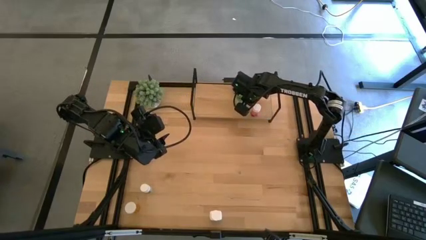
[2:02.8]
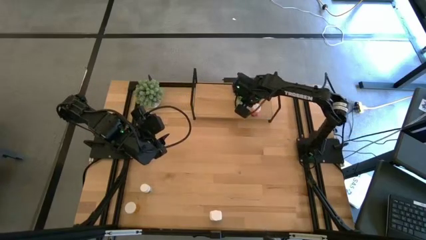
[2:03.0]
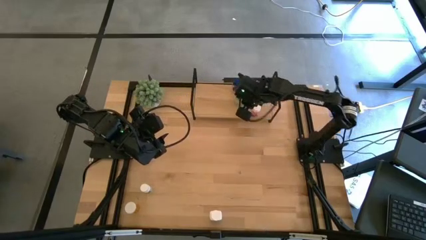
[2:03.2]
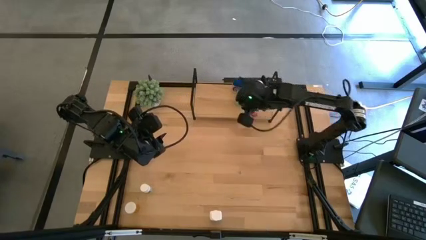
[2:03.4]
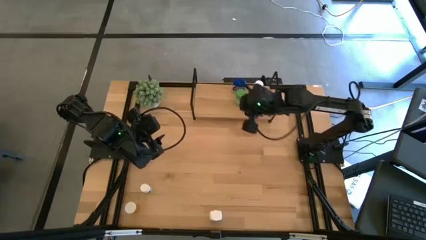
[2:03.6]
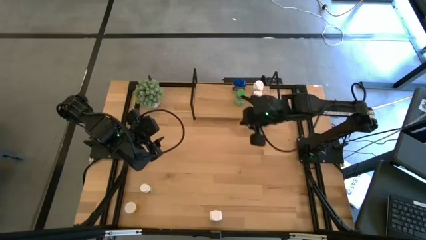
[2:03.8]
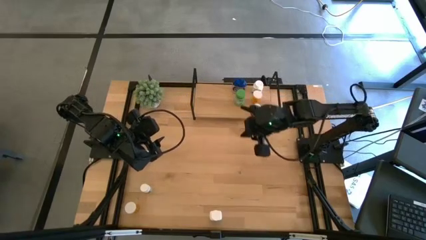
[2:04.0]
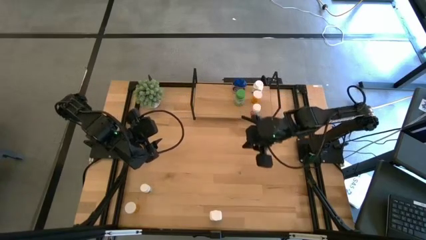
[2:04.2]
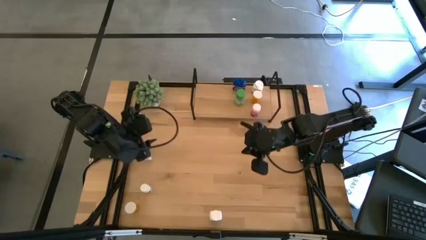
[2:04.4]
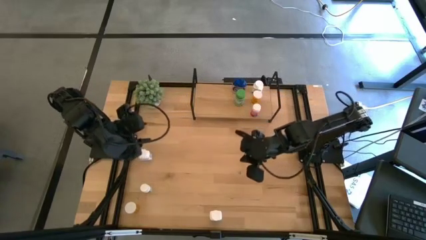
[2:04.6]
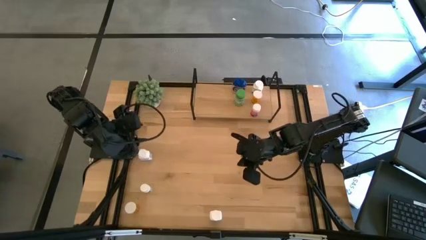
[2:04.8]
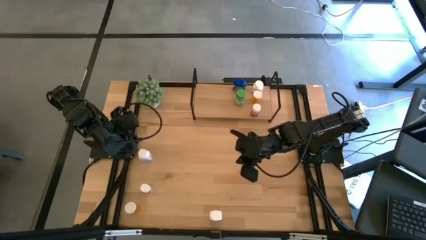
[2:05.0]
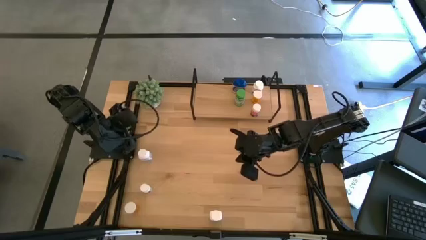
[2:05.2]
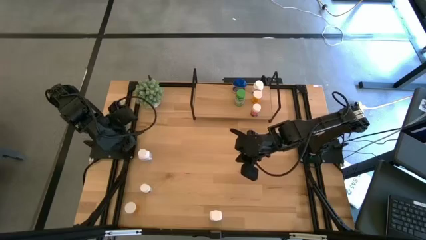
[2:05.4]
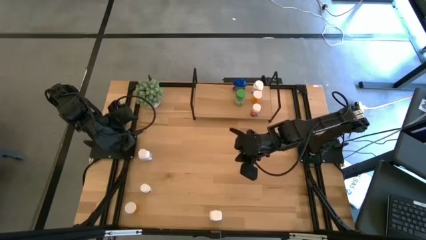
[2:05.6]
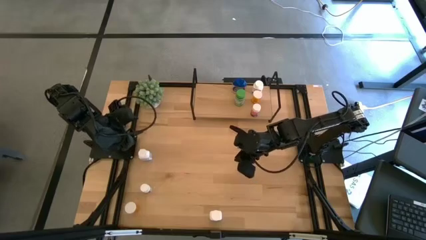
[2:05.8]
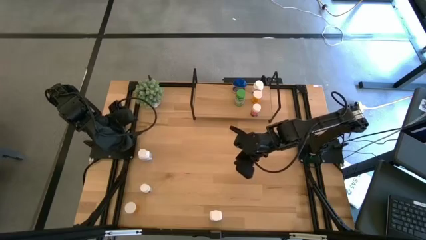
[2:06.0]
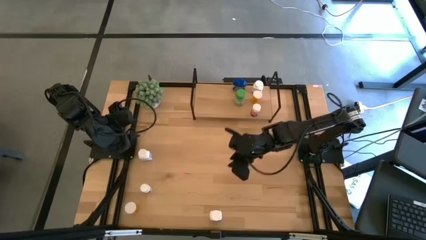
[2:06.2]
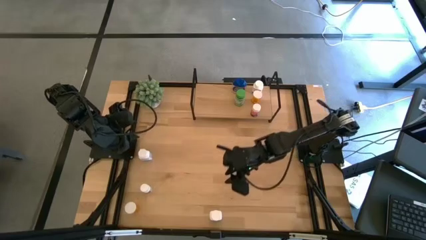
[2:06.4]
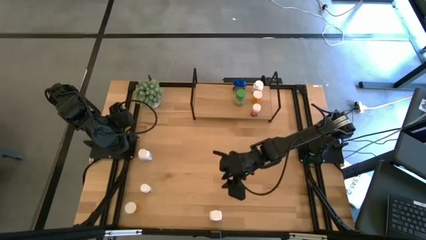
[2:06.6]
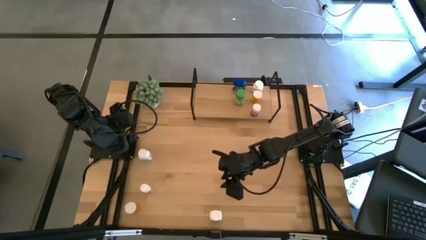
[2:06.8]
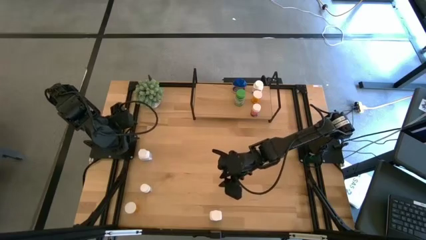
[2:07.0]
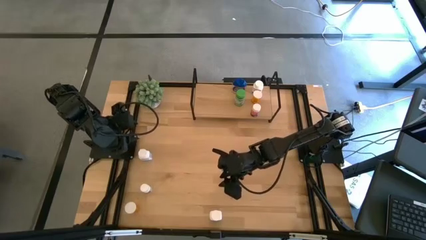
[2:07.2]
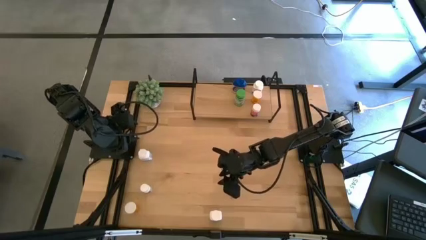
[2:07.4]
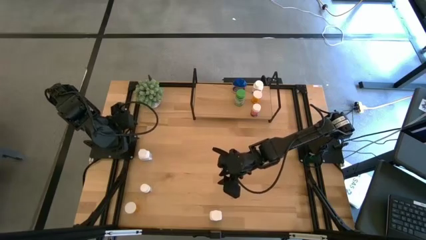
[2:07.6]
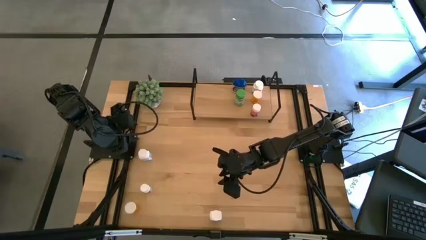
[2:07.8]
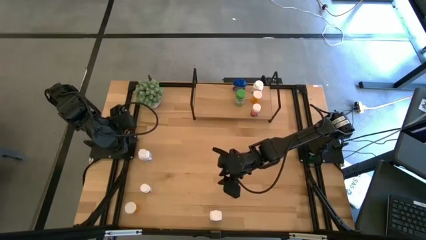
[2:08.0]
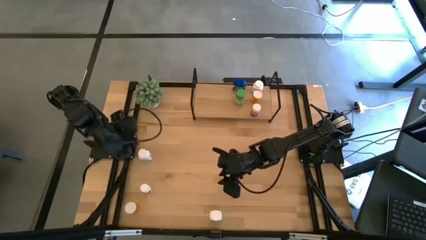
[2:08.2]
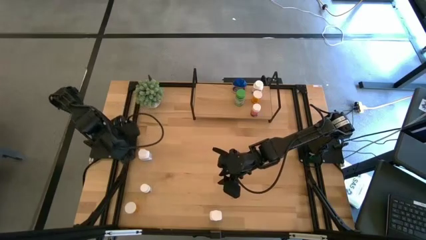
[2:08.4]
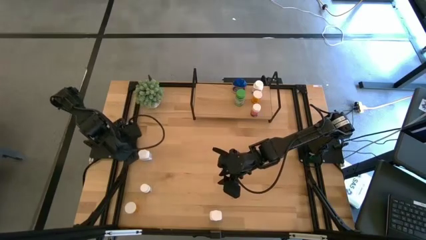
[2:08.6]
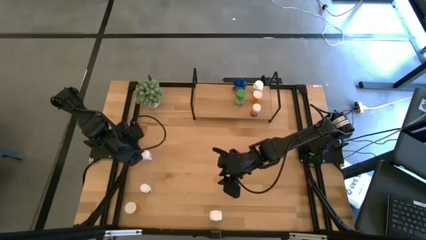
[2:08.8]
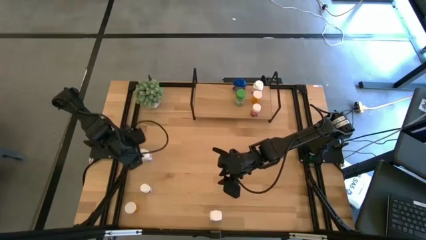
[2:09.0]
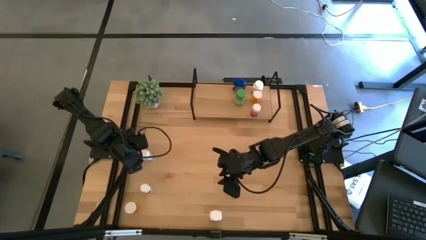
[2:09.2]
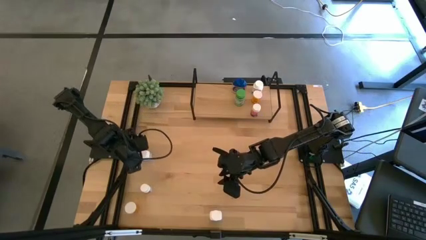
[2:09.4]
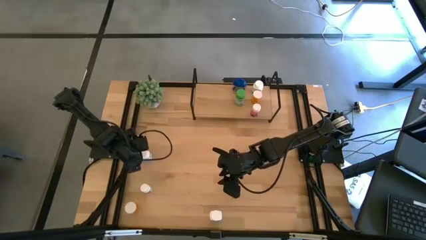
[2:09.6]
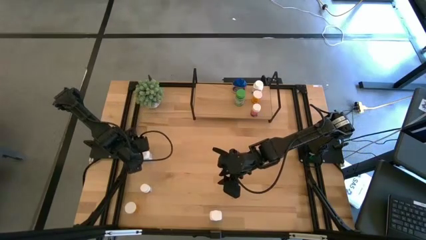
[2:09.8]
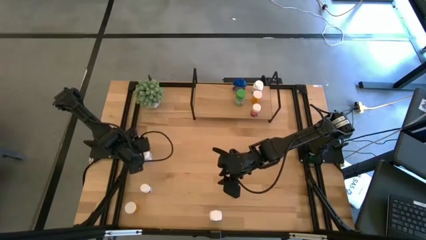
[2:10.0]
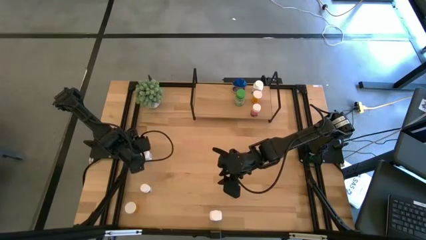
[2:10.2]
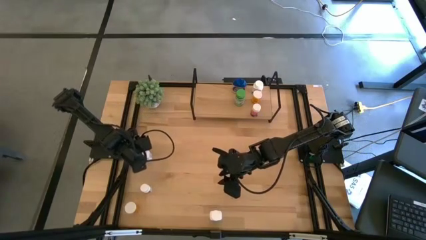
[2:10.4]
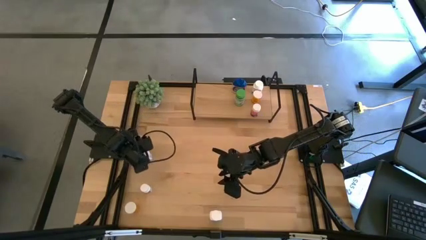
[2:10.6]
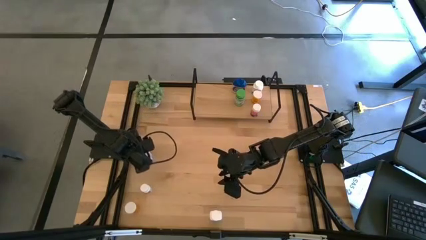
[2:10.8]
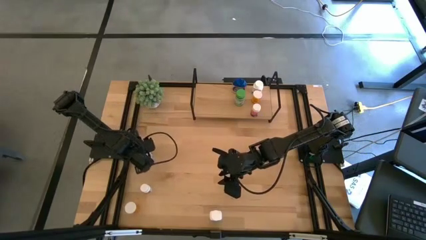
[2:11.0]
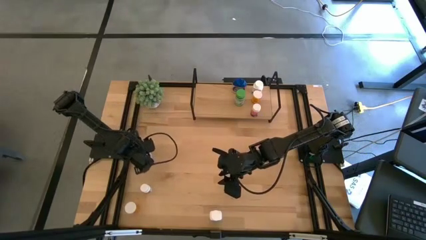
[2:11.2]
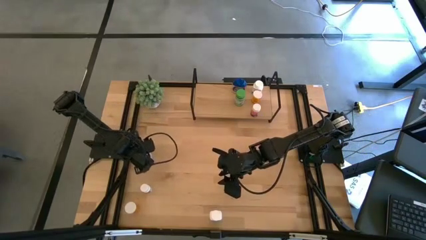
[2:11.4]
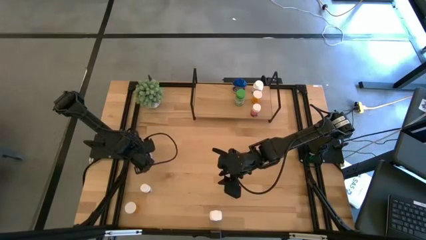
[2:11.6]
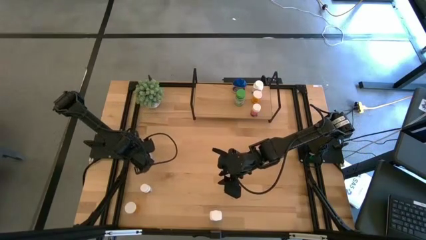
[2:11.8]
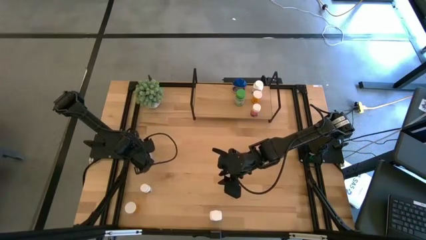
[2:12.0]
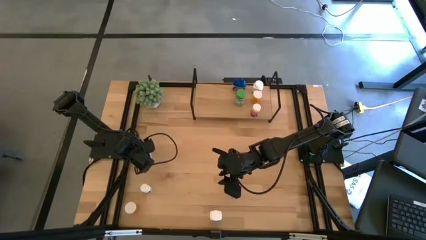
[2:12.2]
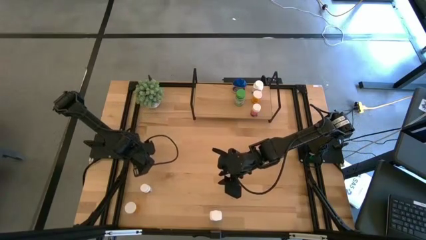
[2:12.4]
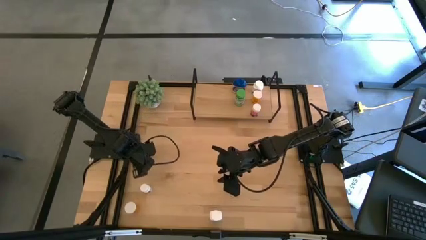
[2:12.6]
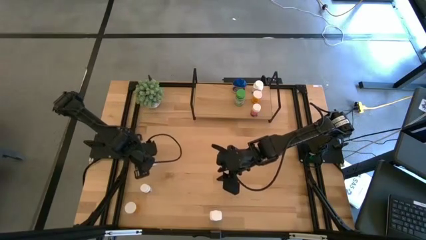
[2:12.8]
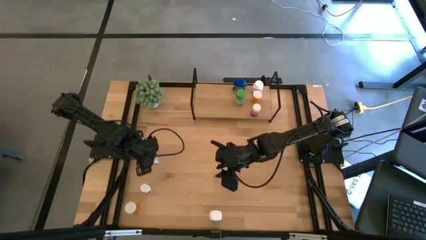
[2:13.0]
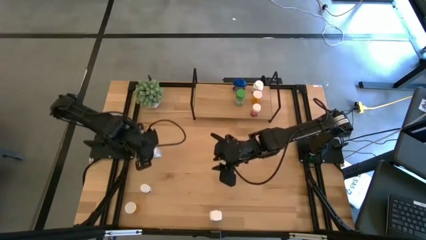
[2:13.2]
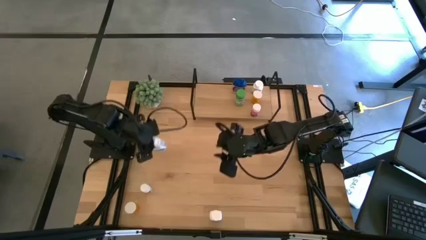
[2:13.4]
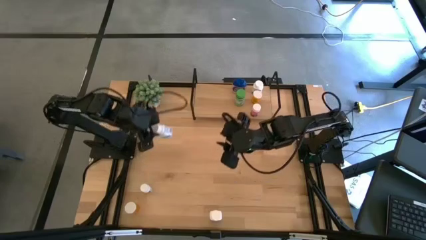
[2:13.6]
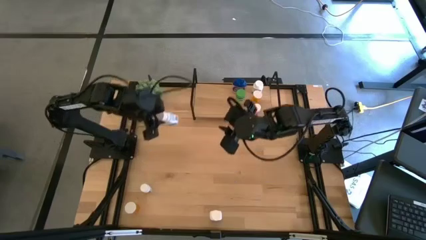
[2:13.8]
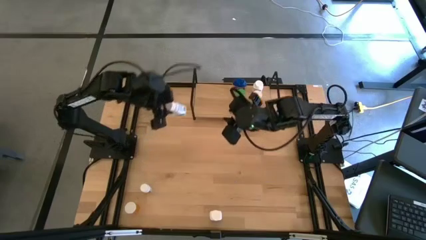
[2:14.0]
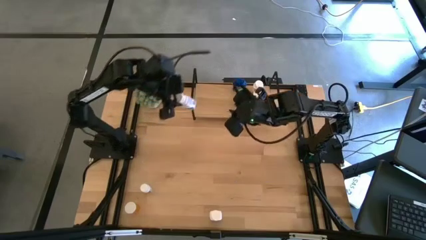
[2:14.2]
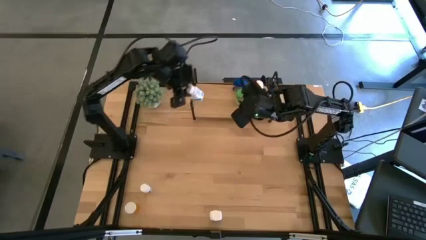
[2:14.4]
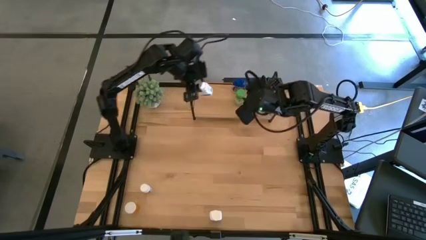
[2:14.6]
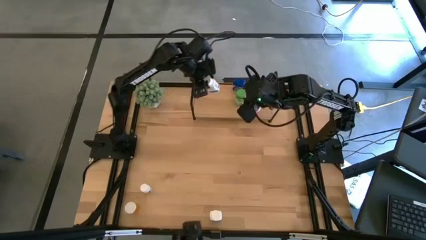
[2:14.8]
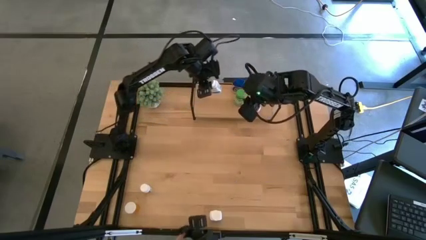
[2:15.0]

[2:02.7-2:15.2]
Task: Pick and place medicine bottles onto shelf by color
Put the top white blue medicine on the shelf

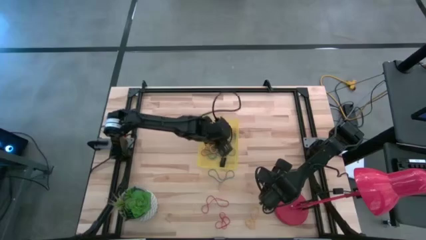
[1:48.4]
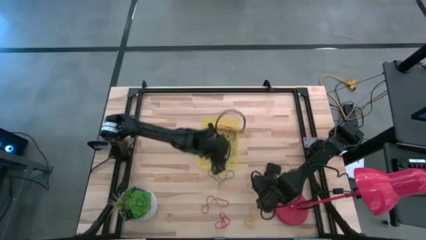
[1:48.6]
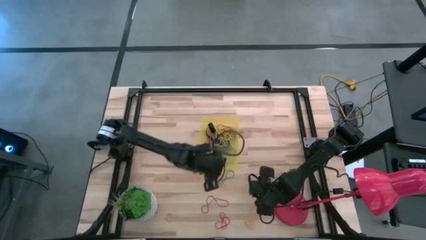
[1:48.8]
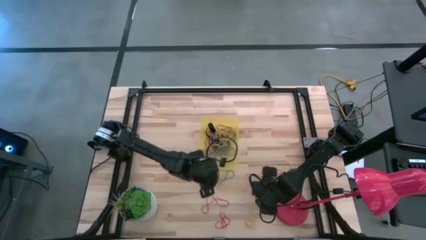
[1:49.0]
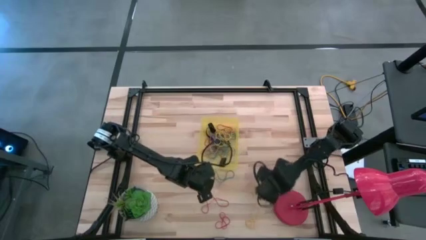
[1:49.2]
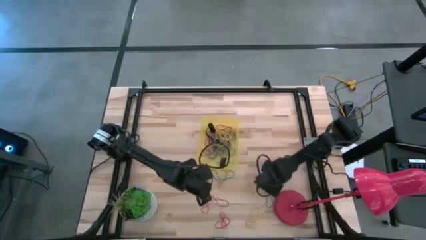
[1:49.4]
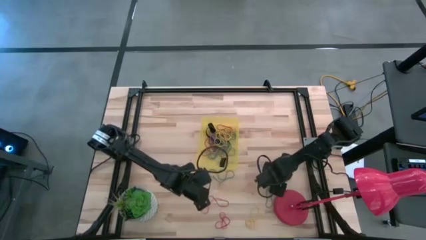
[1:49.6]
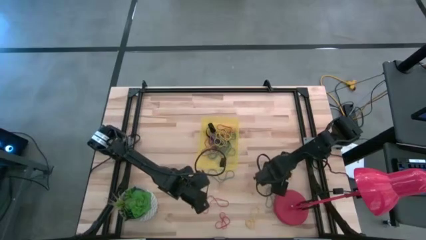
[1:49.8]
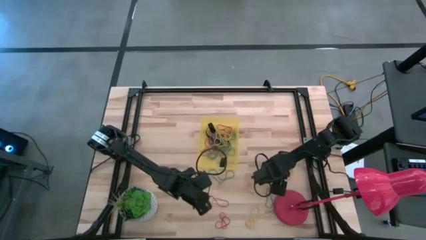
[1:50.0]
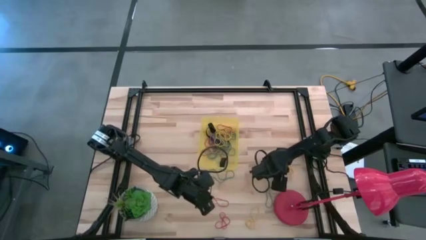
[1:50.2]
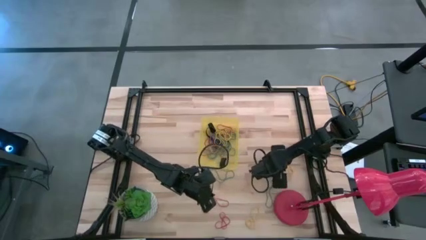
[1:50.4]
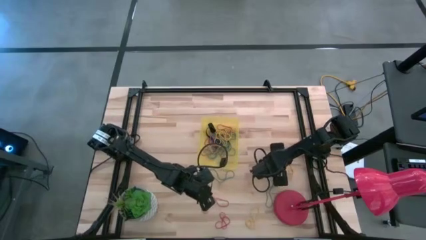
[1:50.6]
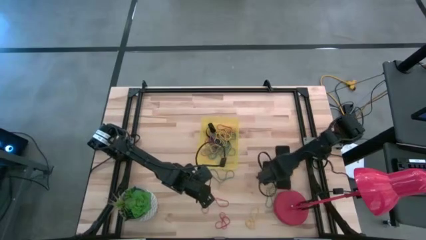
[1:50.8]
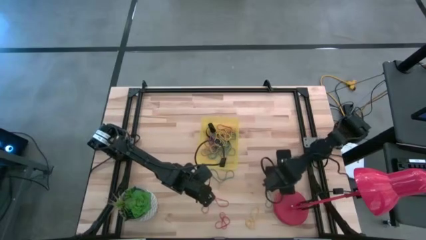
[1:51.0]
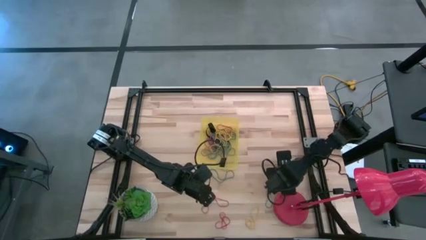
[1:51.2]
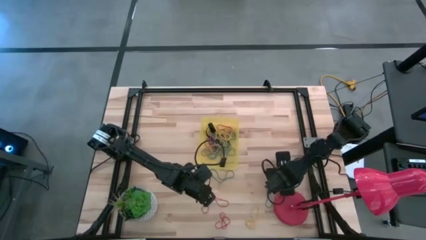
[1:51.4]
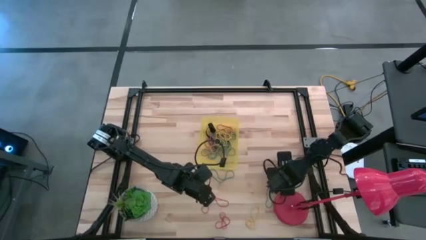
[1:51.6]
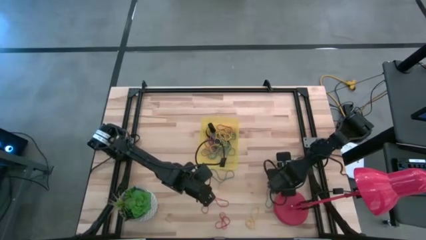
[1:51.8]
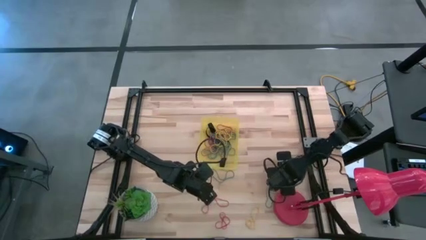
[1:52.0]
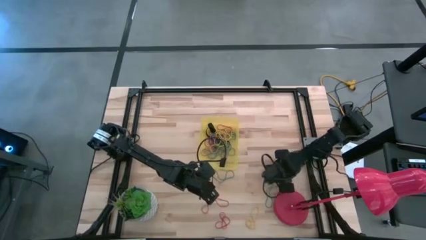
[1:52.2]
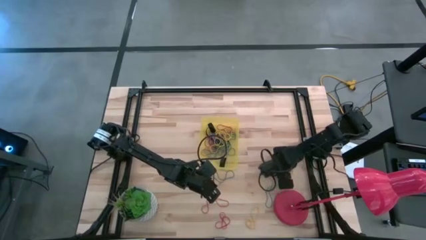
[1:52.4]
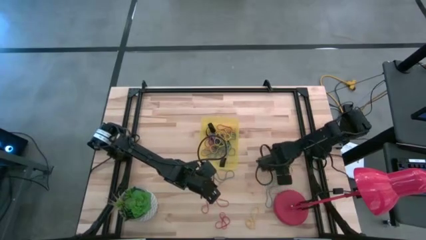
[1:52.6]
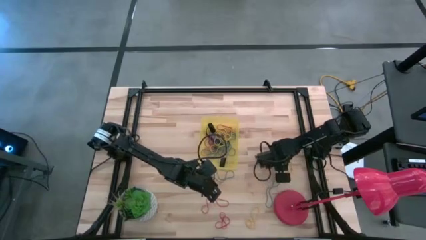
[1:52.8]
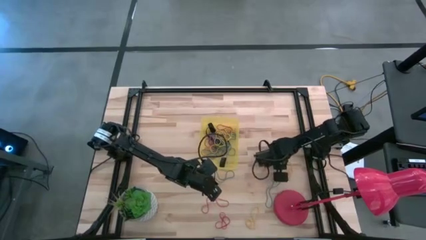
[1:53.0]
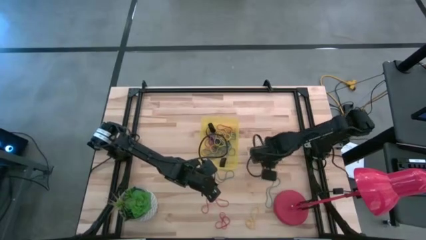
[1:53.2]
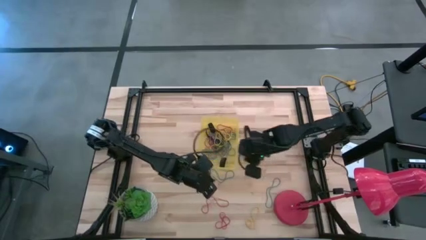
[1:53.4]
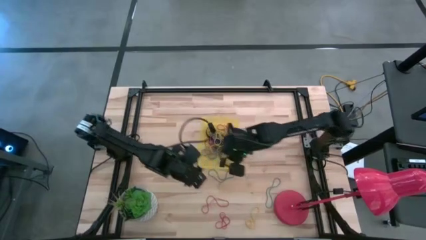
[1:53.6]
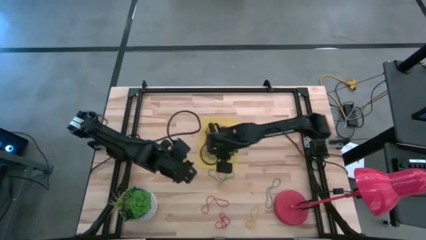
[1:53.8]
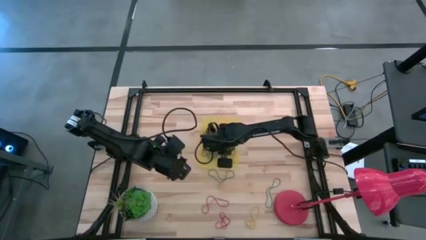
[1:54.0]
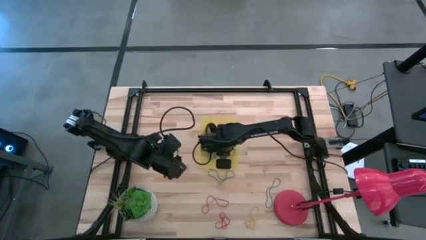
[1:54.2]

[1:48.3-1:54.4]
Task: Pick and place rubber bands into bin
Put the yellow rubber band into the yellow bin
